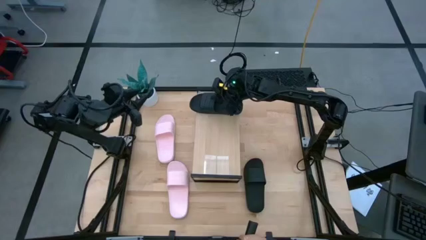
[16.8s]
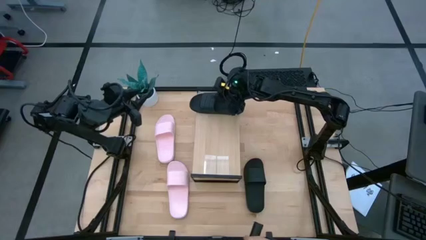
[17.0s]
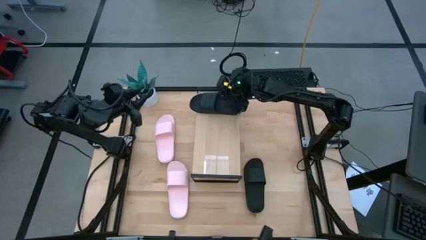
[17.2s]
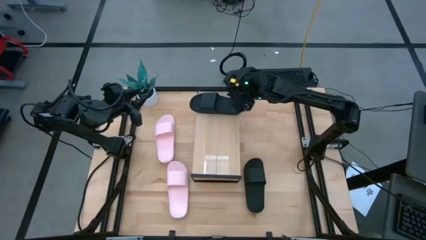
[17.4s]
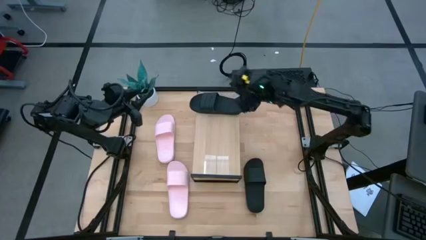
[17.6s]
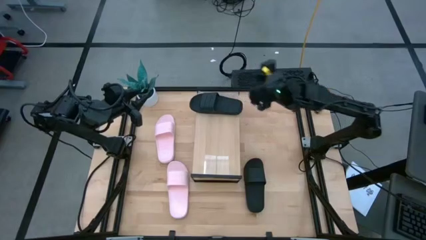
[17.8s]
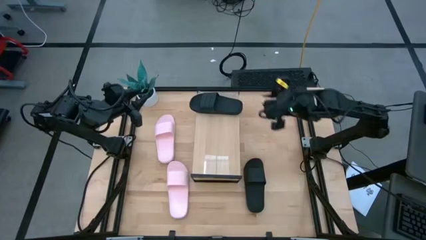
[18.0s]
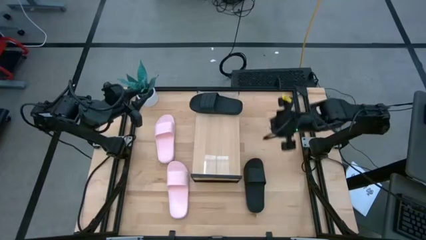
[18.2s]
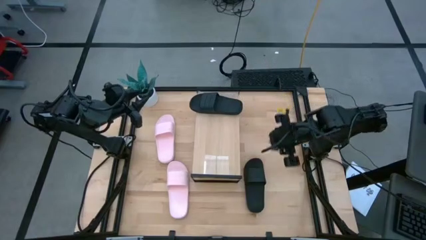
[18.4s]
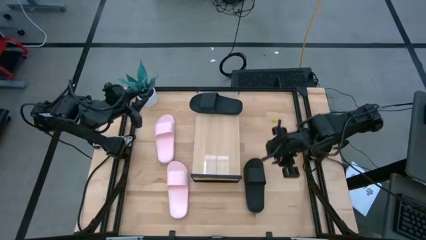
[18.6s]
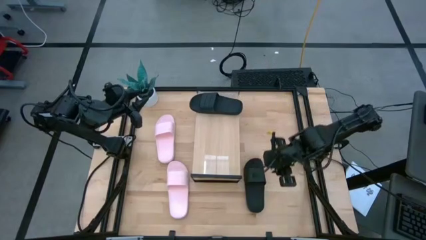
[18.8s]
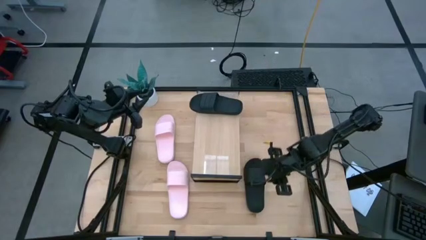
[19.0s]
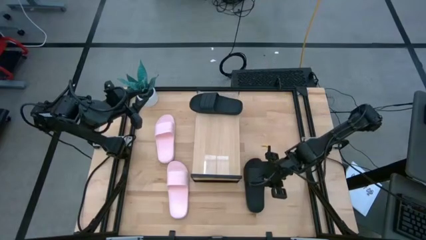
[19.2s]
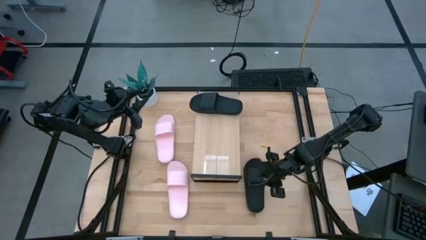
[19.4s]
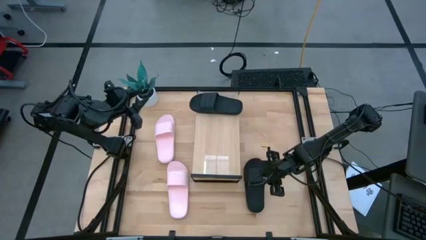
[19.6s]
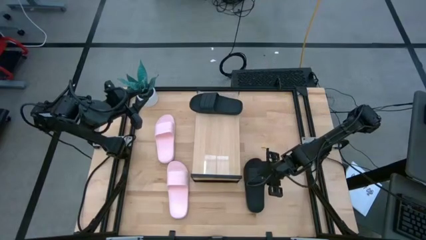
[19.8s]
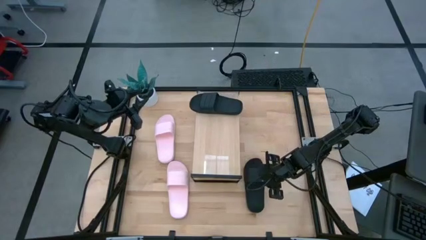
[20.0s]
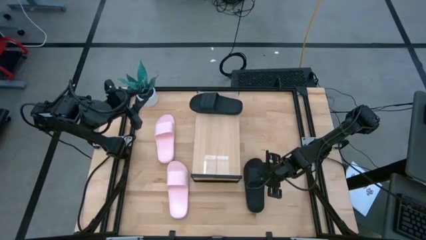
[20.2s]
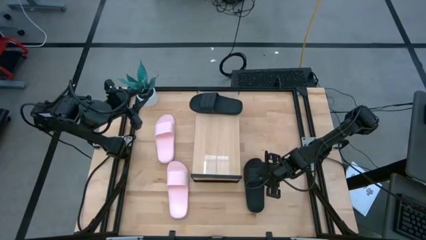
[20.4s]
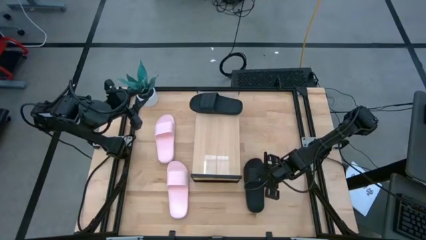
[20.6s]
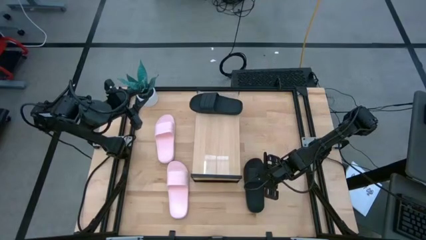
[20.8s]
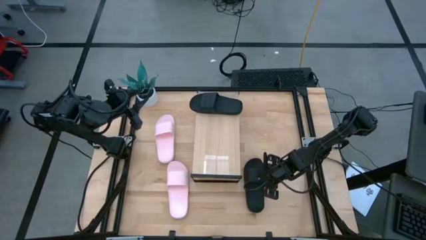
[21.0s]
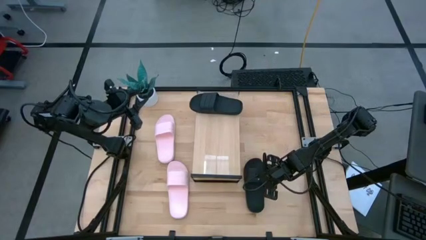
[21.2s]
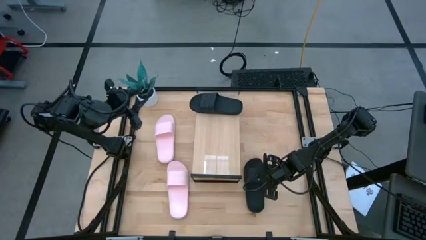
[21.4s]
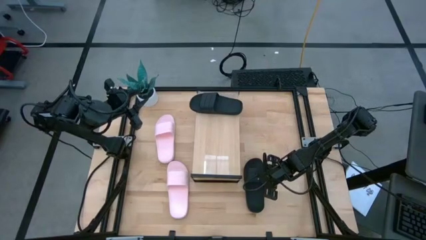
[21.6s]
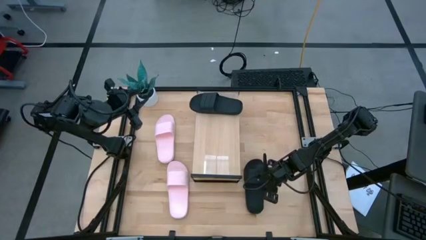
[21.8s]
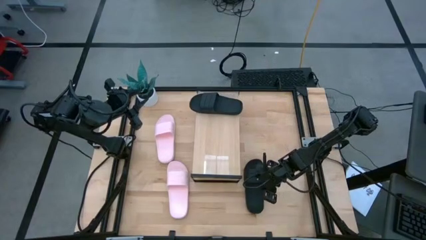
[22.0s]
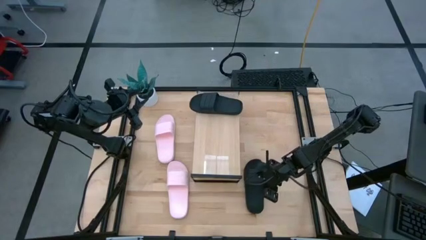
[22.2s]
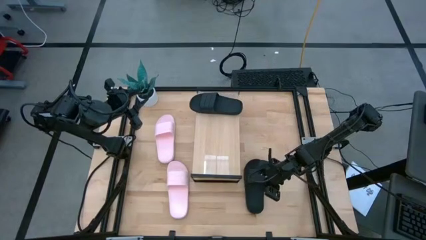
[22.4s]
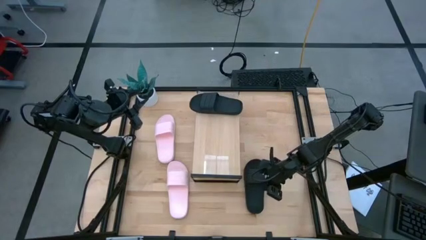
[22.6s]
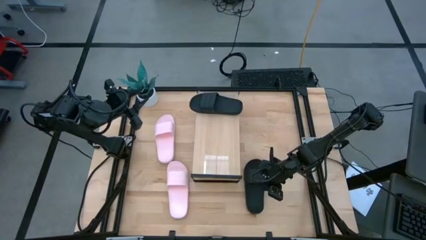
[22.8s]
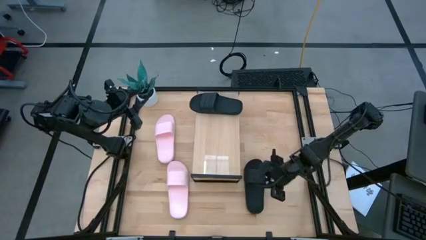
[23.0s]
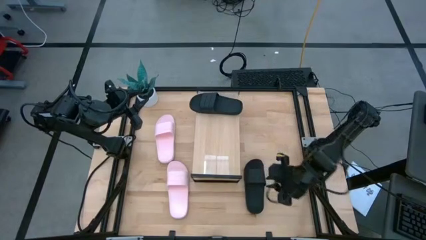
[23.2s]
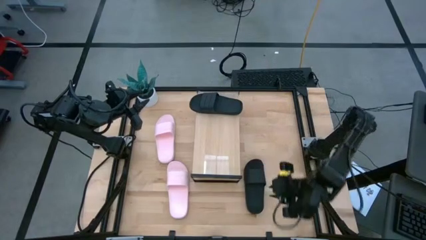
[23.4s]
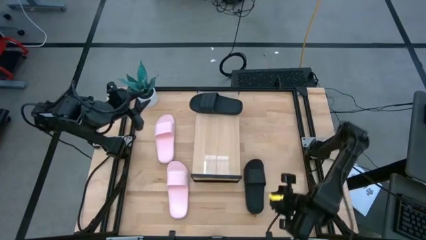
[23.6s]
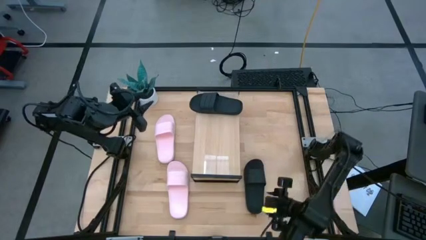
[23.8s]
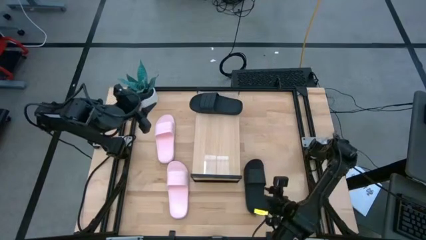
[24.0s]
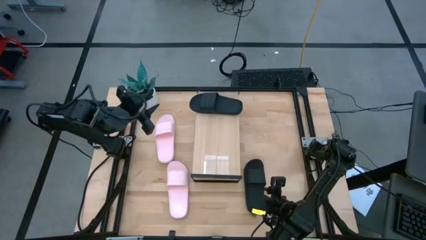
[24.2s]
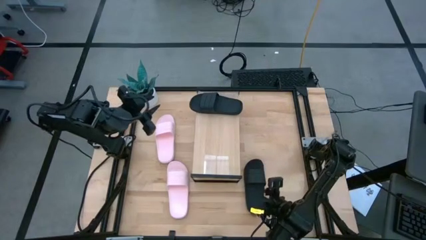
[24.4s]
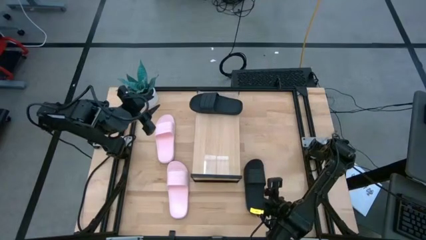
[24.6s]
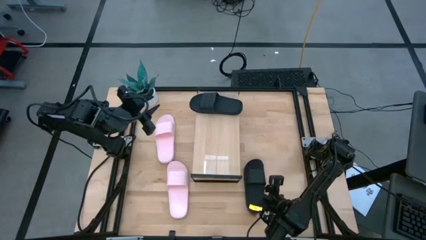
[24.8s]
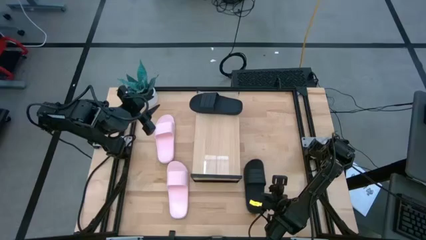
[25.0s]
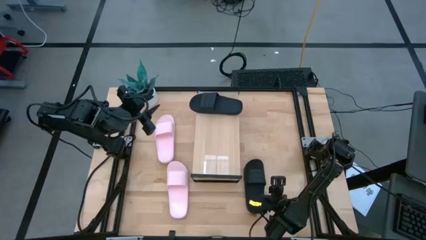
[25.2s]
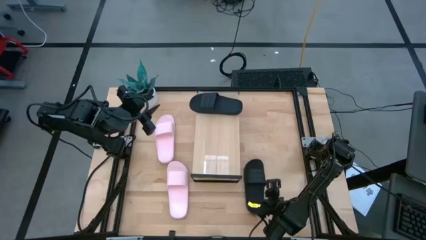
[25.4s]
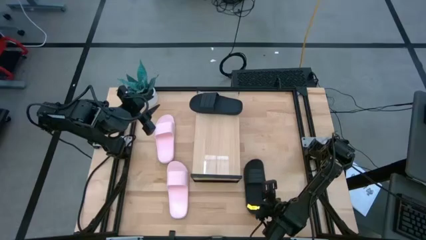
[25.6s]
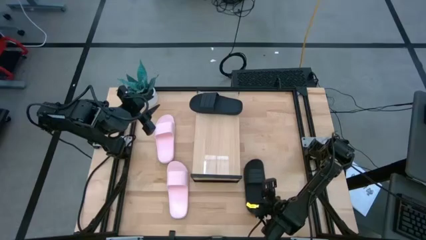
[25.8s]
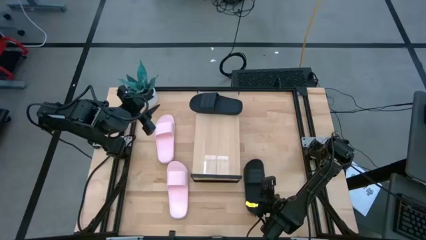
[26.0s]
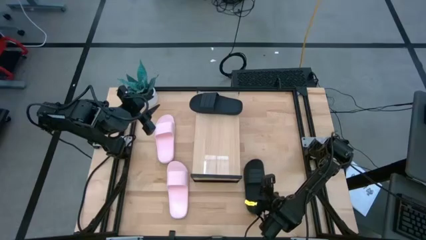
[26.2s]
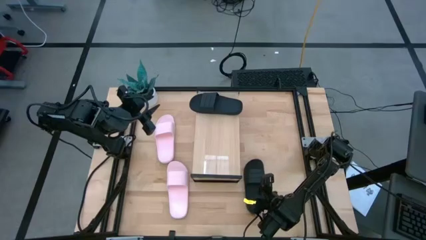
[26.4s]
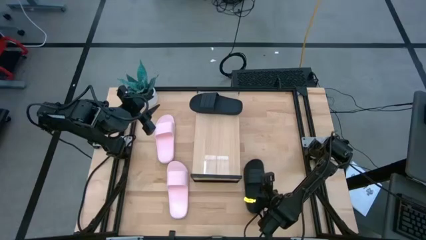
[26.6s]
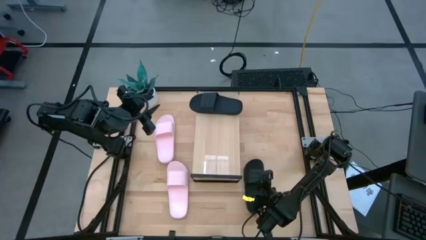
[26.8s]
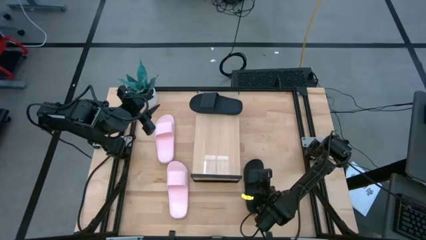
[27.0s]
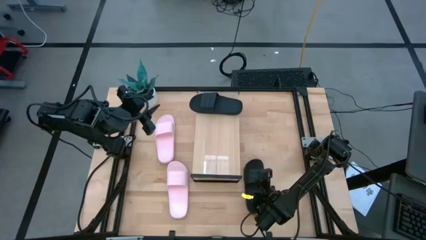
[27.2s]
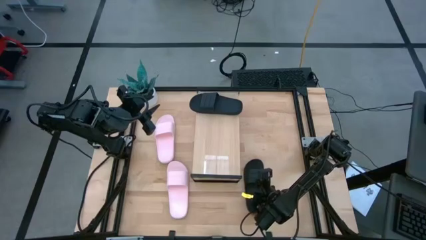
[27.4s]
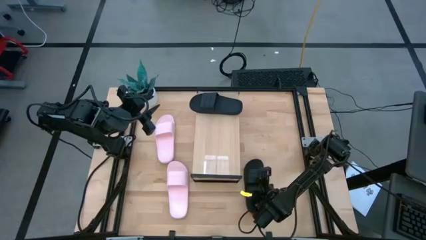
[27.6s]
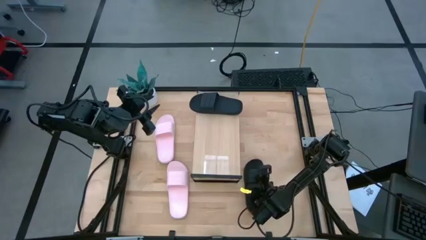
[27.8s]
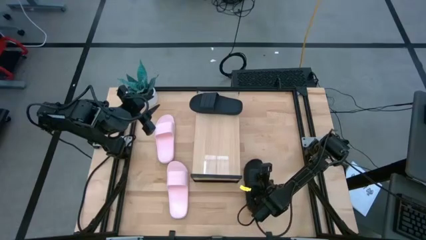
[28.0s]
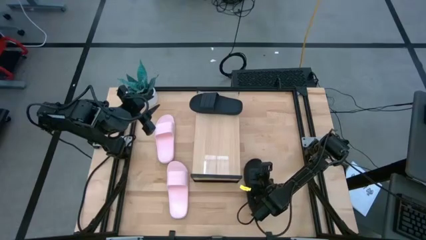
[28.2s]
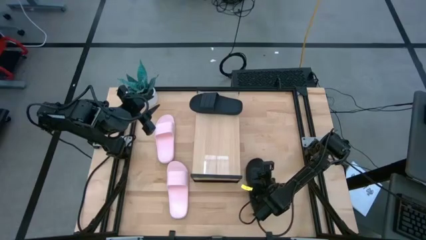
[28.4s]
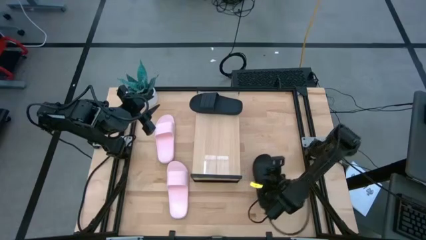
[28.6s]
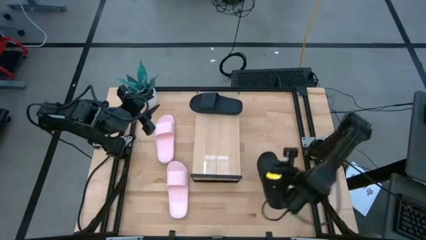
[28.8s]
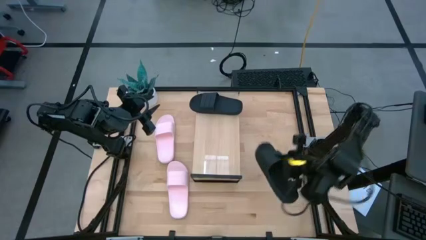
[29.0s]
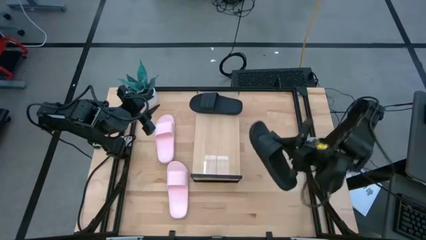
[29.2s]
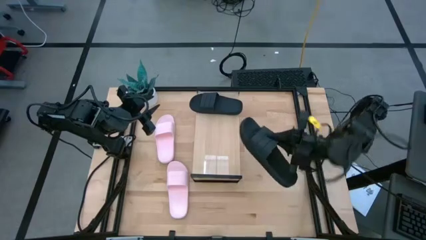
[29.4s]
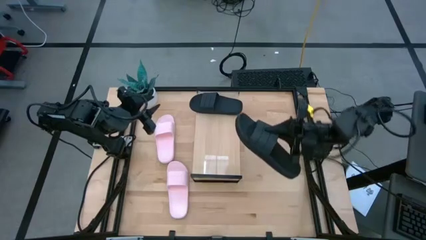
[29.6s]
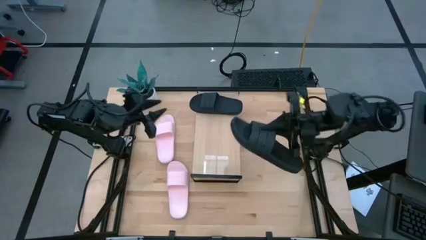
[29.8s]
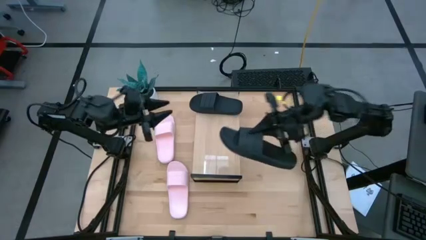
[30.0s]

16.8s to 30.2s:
Task: Pick and place slides into the shelf
Put the black slide slipper on the shelf

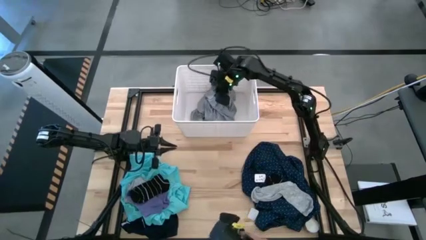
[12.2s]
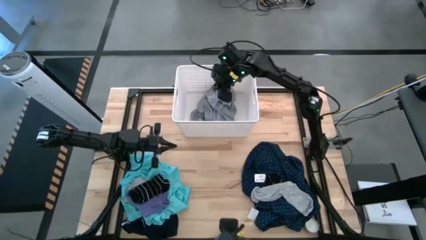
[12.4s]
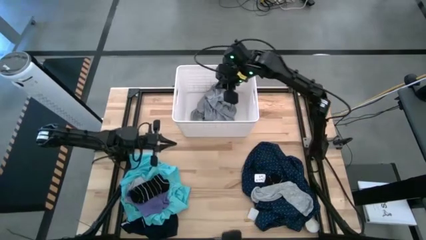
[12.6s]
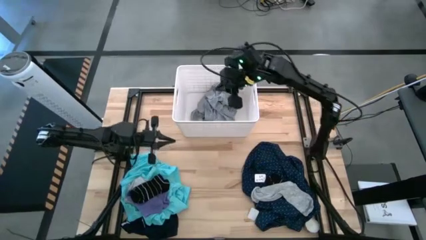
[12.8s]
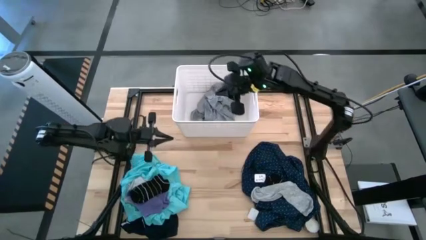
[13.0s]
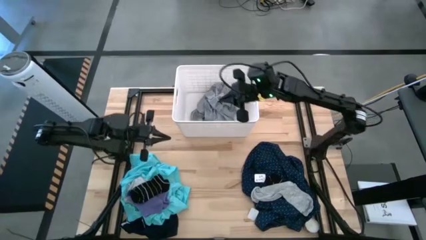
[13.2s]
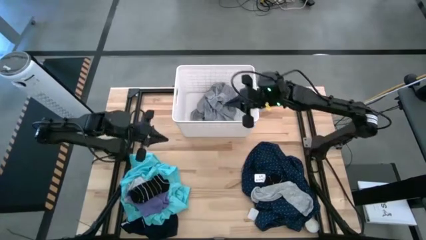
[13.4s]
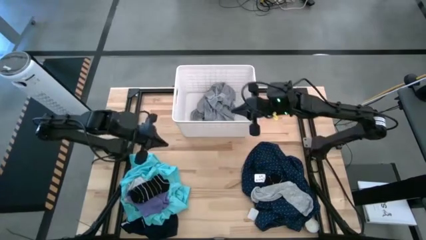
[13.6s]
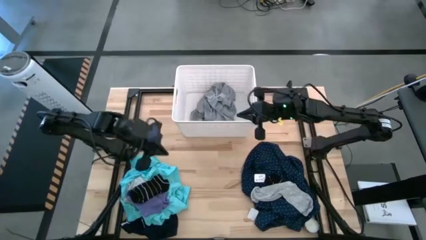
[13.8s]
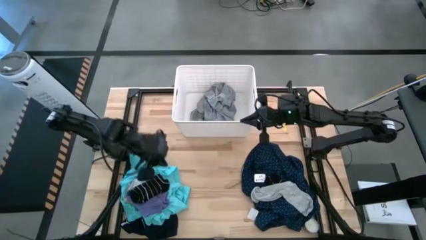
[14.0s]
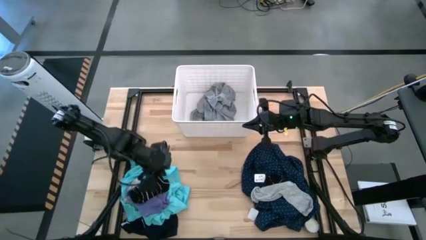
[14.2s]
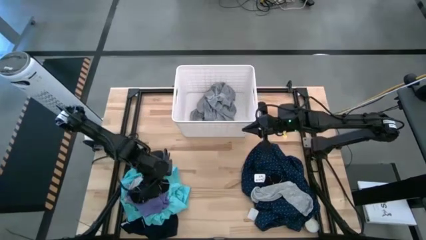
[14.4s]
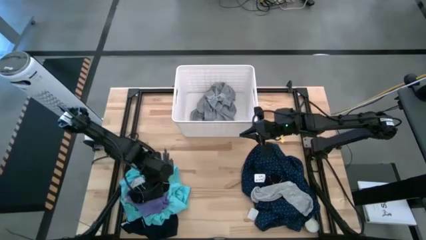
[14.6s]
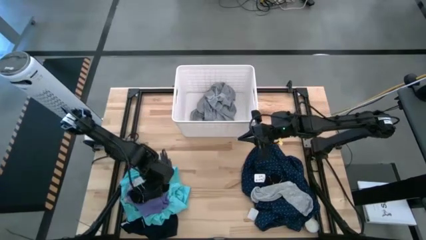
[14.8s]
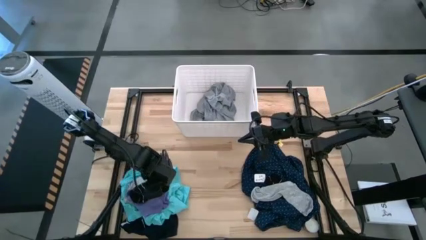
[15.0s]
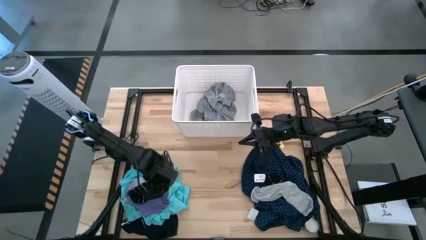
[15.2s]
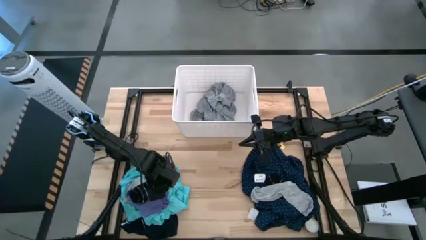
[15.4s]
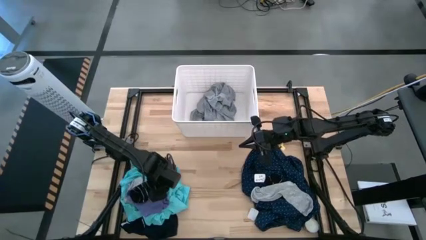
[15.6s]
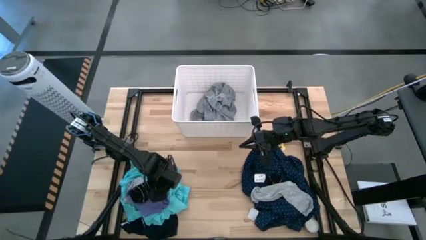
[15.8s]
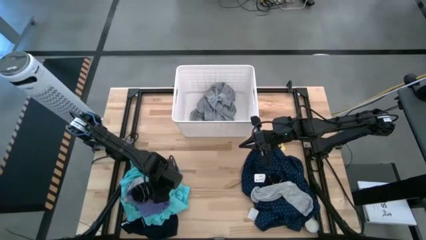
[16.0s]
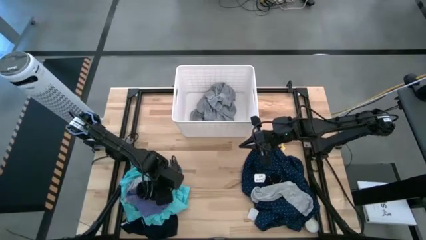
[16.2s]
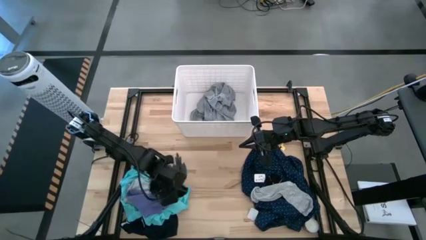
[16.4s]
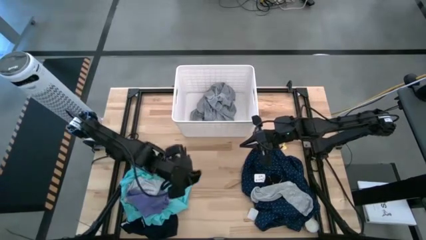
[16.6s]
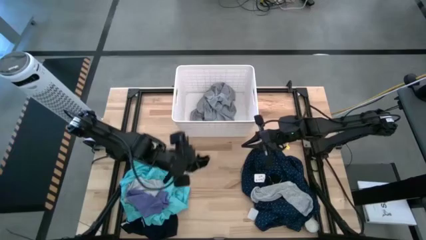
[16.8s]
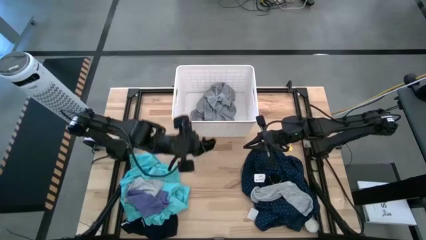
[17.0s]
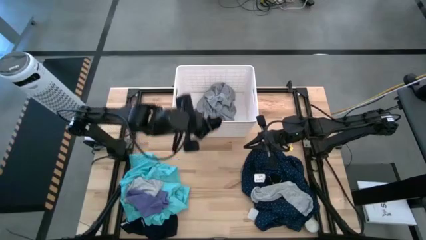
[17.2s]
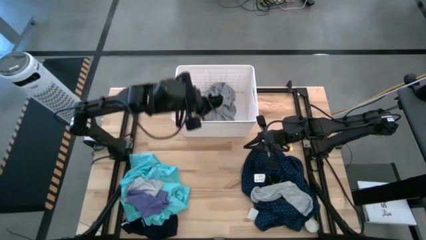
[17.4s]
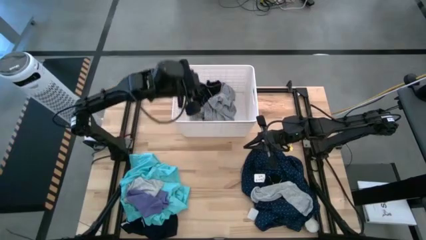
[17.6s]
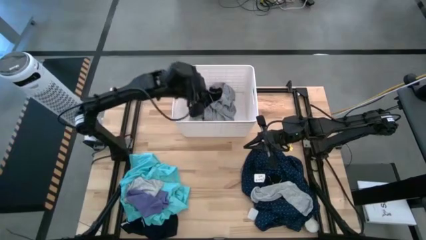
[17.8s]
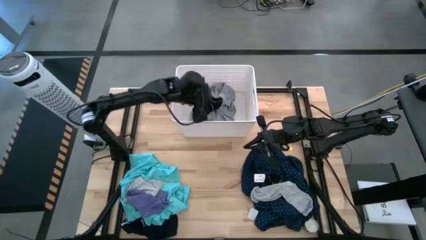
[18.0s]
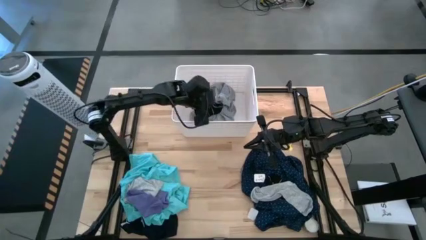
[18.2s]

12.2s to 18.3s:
Task: Sort clothes
Put the black sock into the white laundry bin
